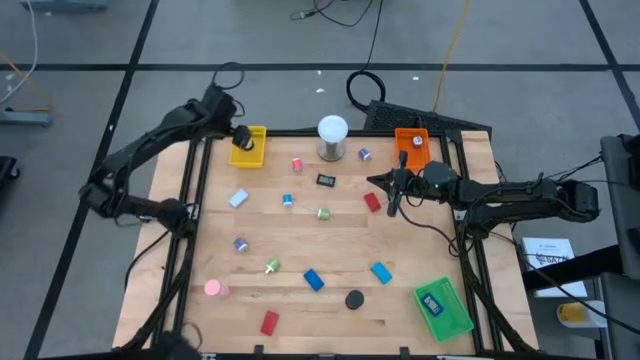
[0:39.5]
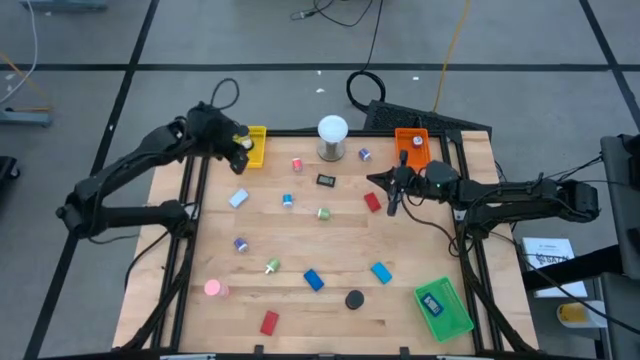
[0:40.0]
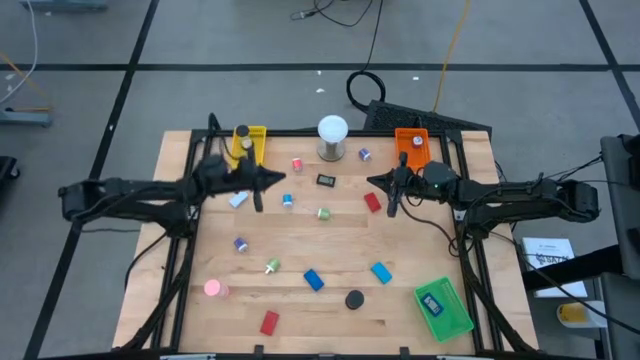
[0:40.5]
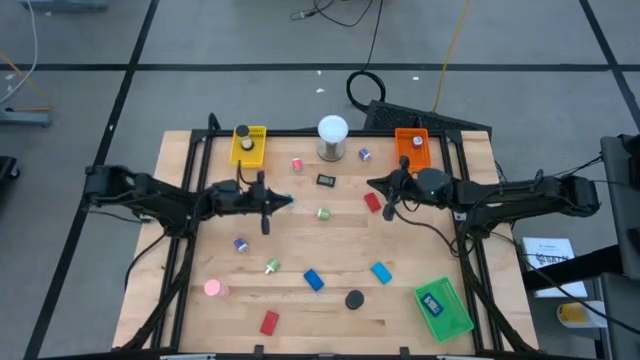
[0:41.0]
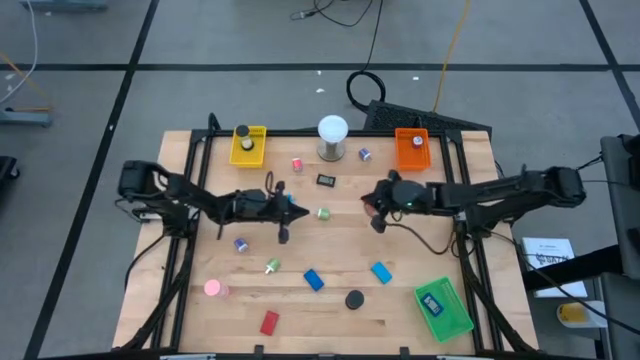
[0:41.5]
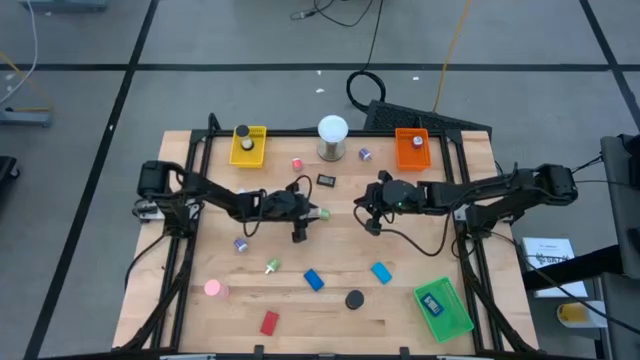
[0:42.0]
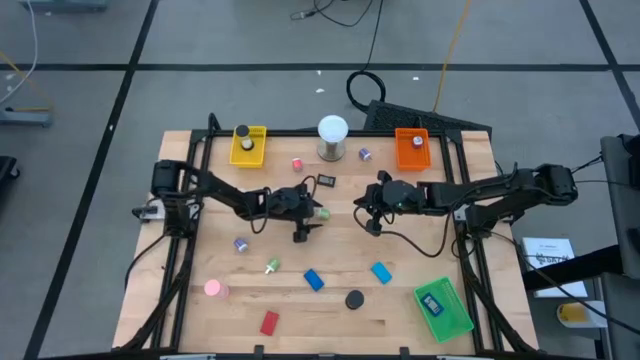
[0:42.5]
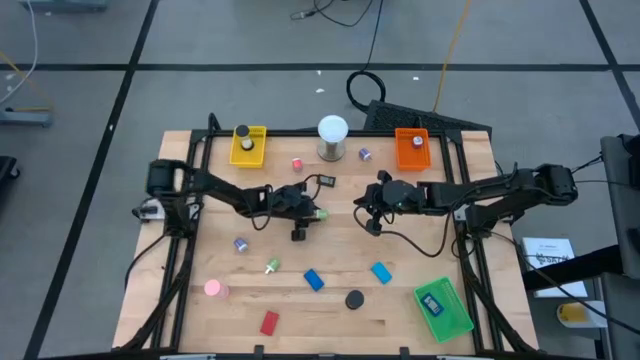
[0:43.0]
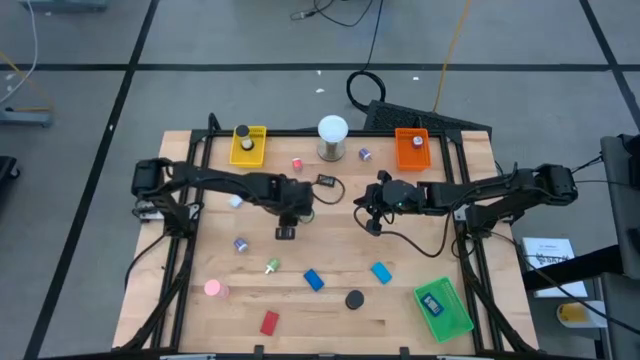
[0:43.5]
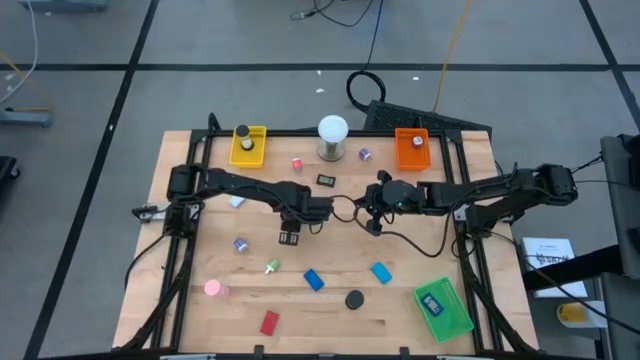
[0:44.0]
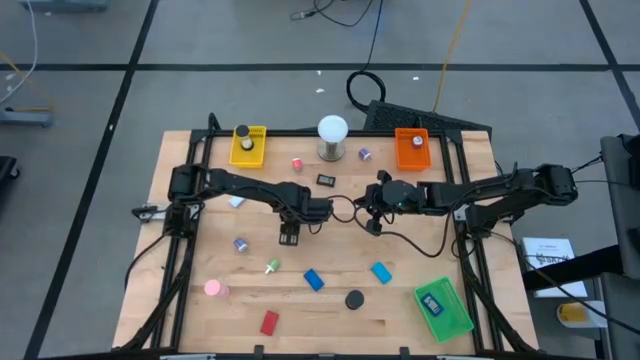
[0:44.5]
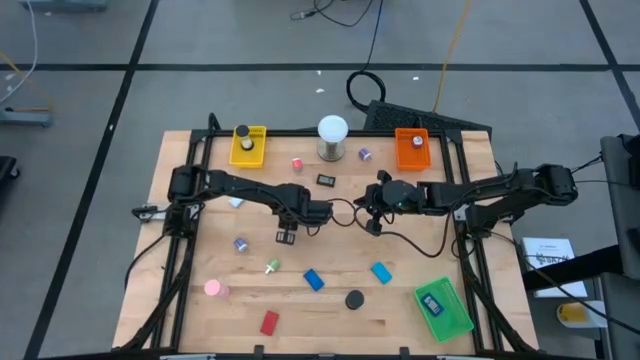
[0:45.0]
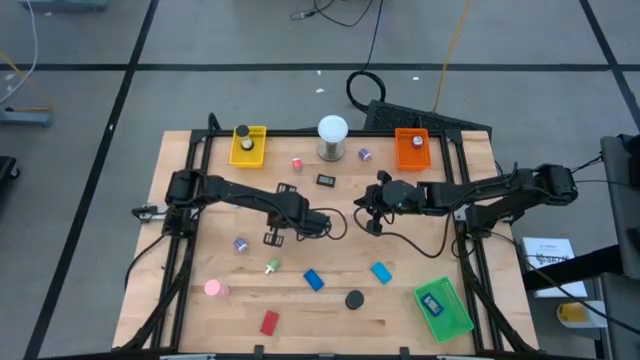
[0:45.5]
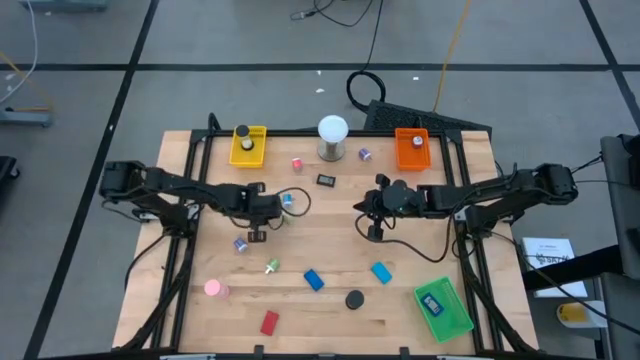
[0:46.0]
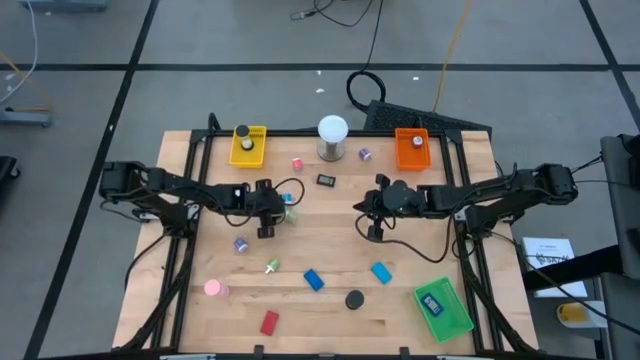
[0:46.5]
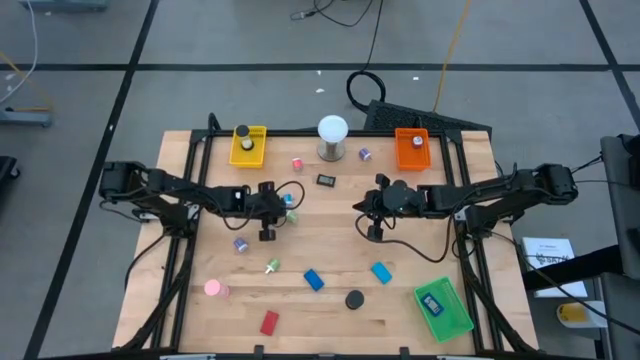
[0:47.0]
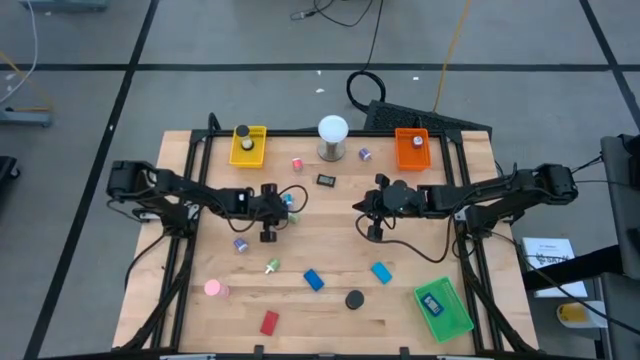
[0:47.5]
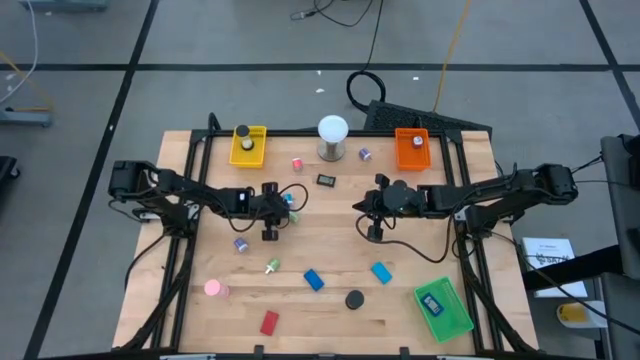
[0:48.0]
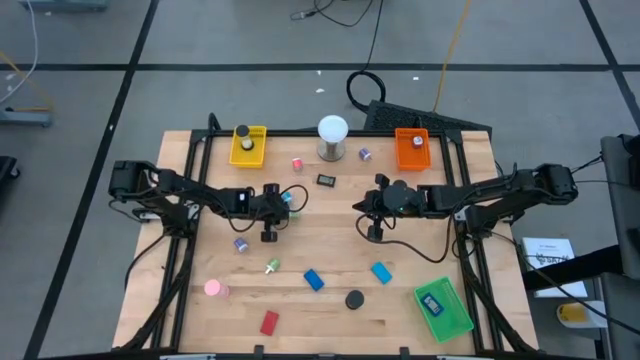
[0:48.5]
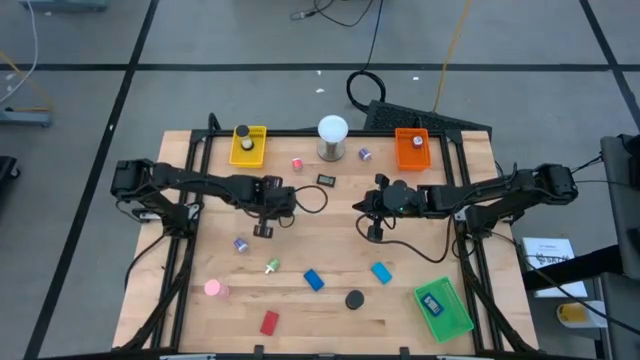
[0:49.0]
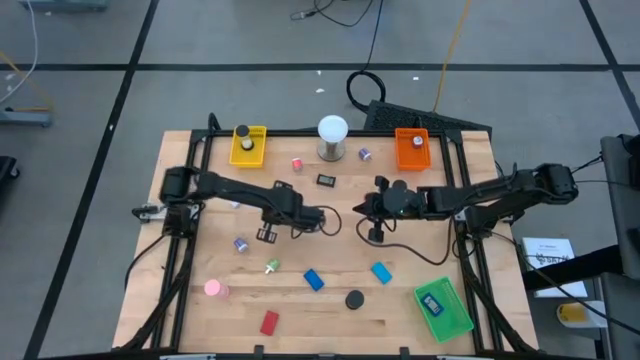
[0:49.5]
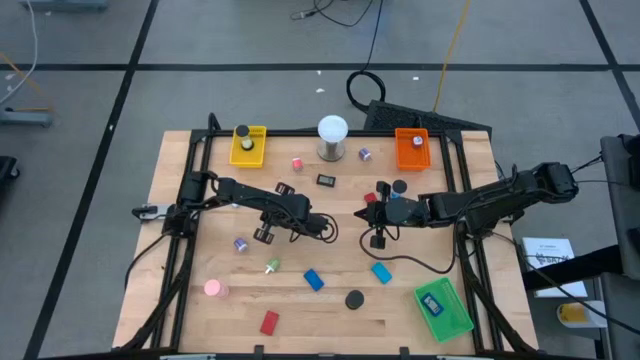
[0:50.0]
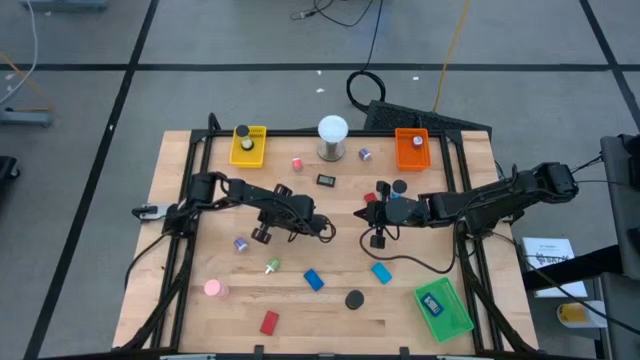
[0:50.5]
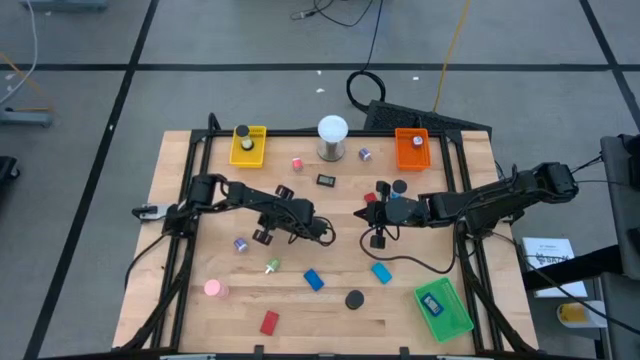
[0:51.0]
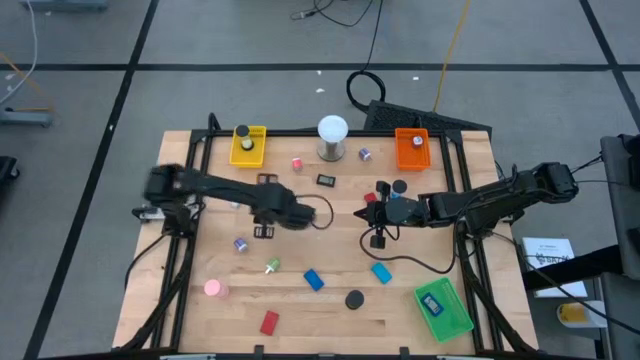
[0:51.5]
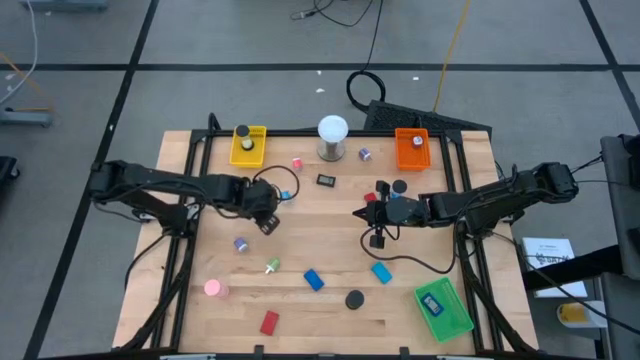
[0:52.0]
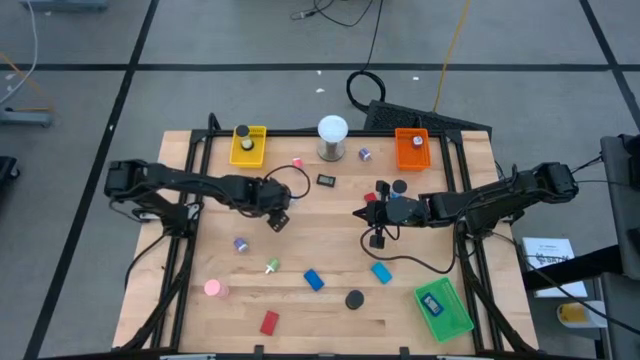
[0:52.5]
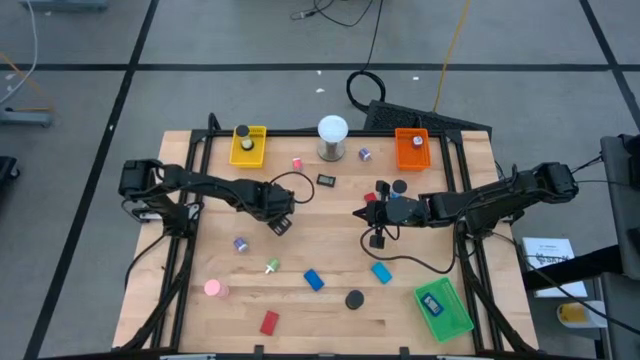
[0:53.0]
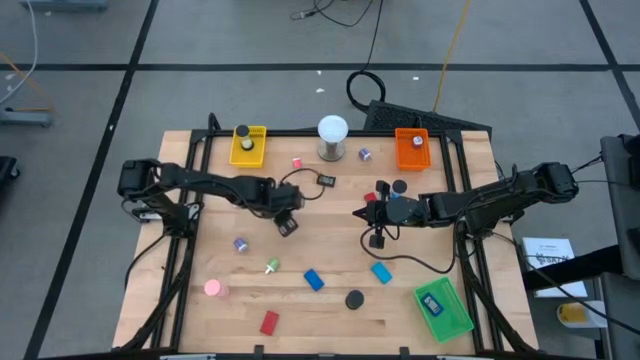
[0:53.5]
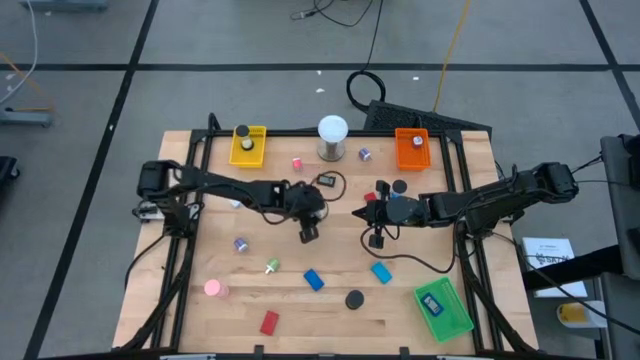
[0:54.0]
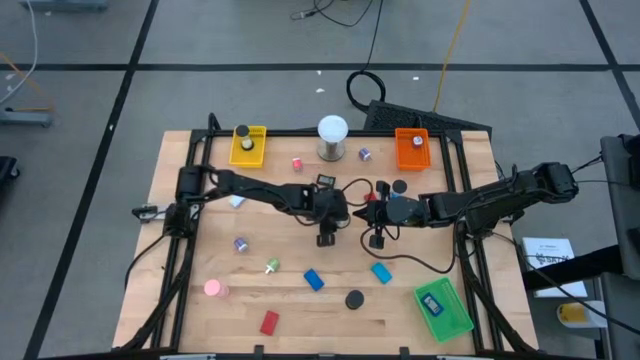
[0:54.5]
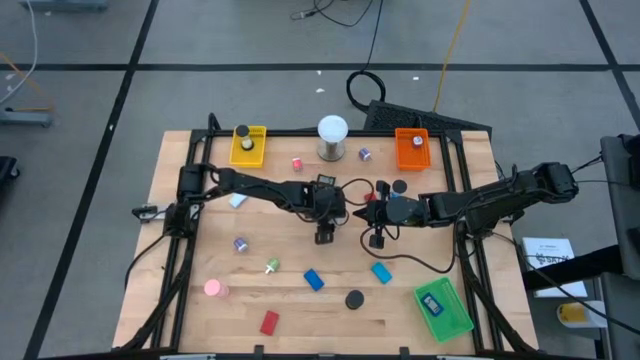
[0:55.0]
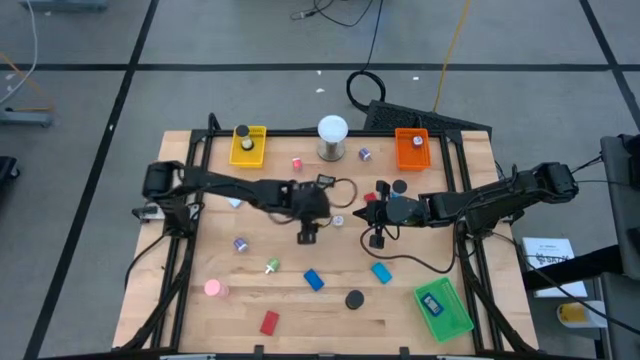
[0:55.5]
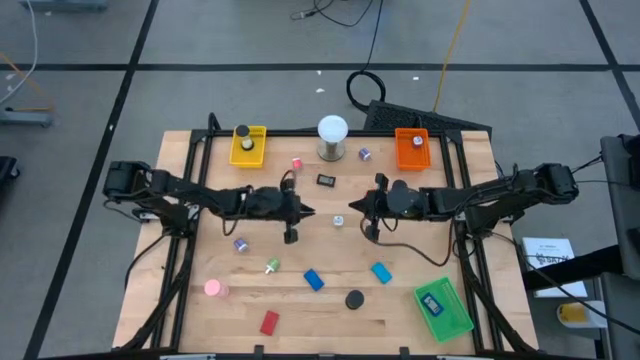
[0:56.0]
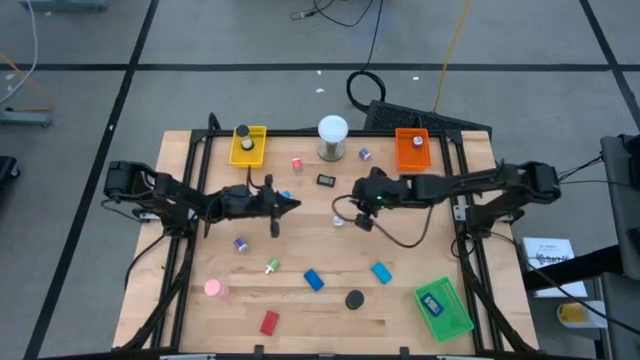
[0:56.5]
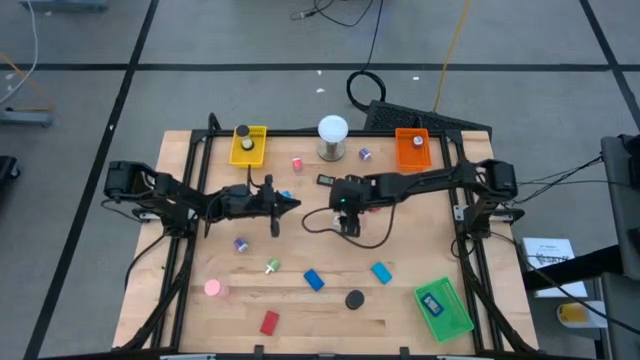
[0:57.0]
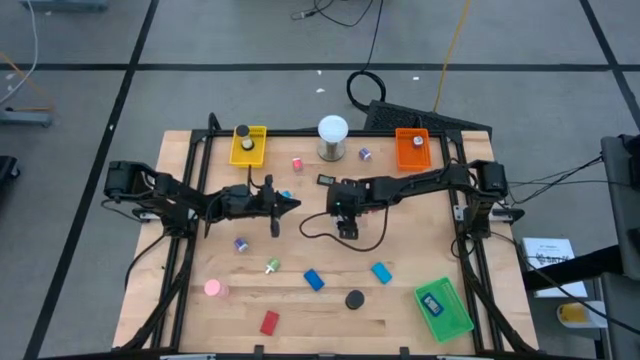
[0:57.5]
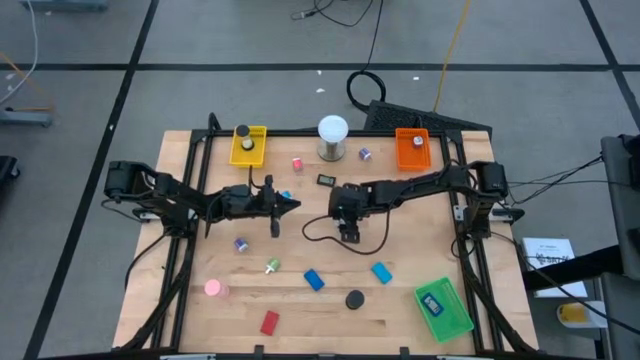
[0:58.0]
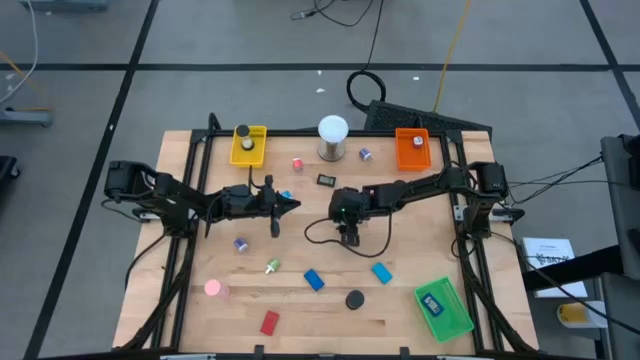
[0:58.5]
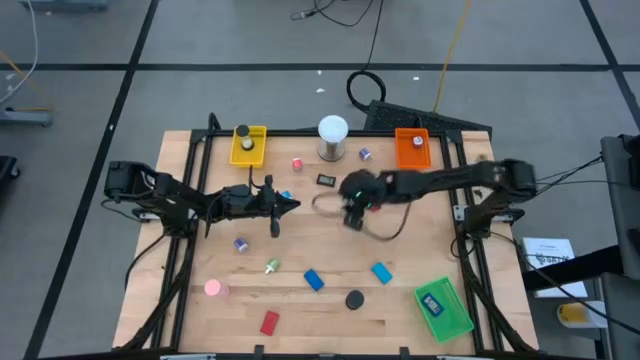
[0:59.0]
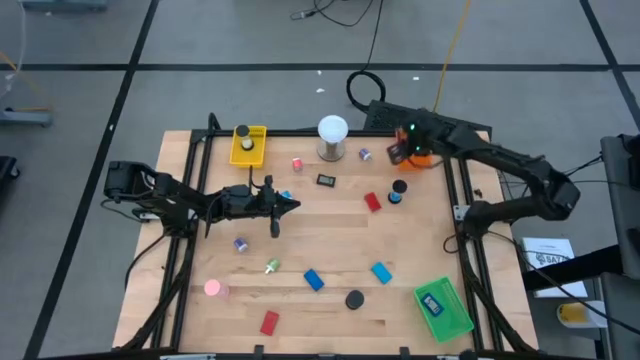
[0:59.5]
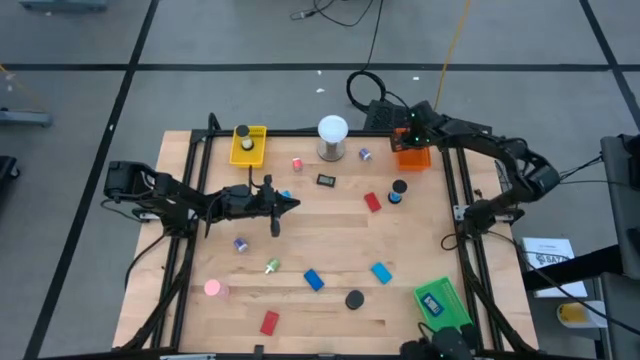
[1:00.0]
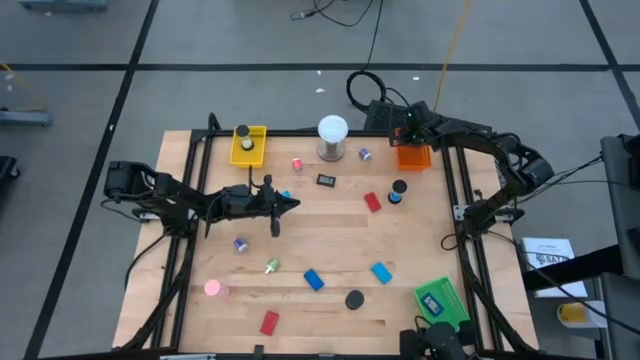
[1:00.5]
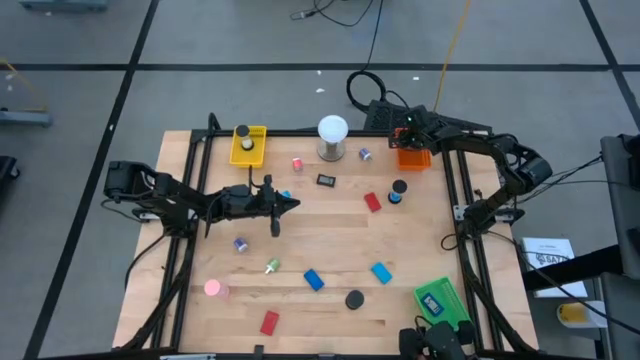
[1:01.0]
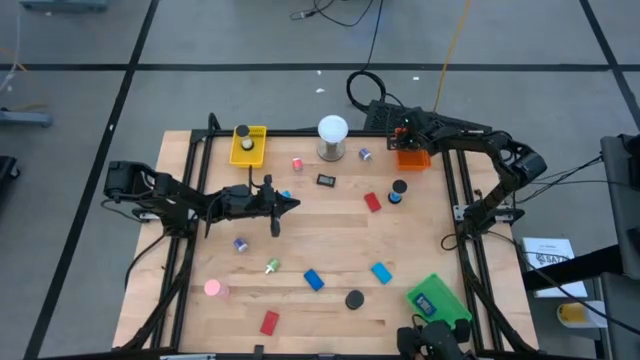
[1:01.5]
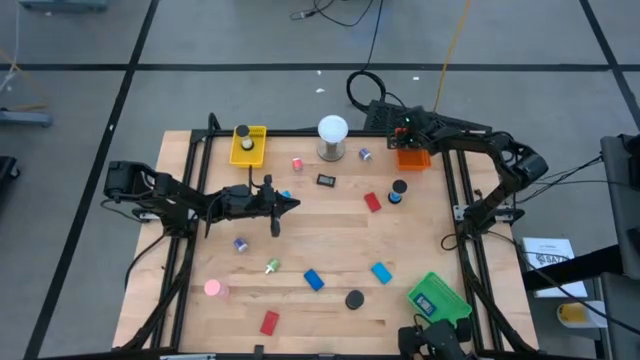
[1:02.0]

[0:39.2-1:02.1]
Task: Pick & Place Office items
Put the top green charger adaptor into the orange bin
